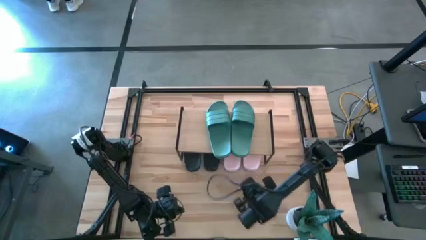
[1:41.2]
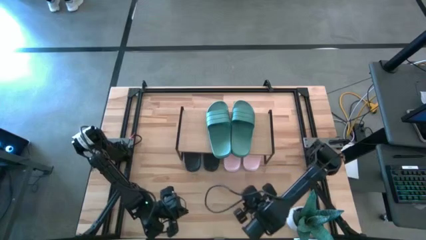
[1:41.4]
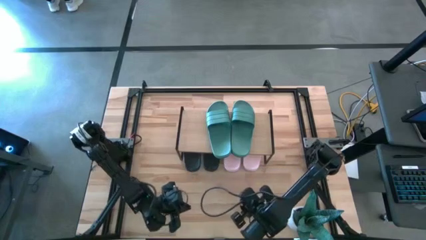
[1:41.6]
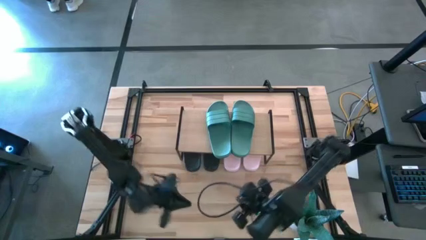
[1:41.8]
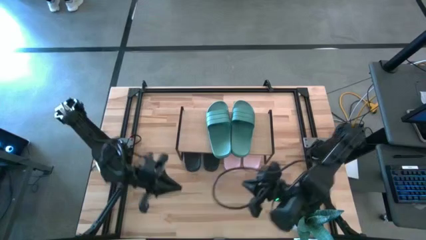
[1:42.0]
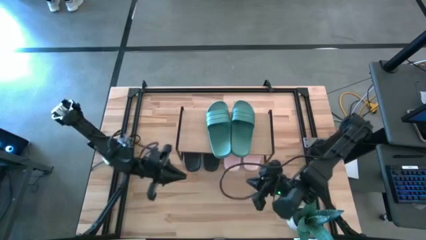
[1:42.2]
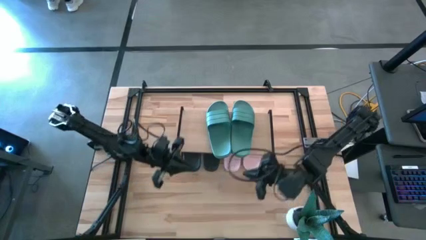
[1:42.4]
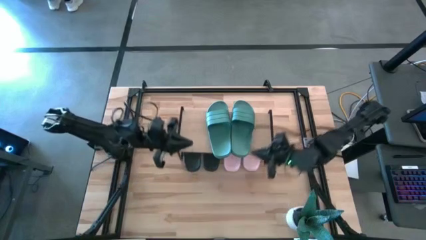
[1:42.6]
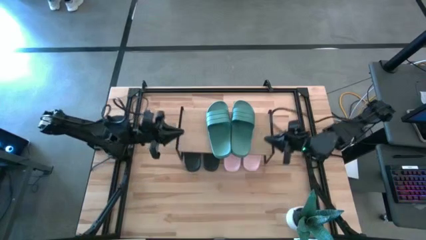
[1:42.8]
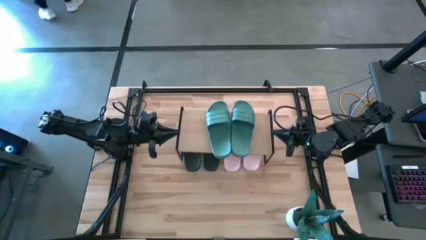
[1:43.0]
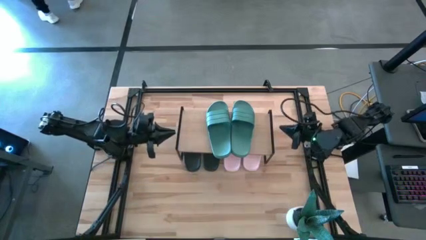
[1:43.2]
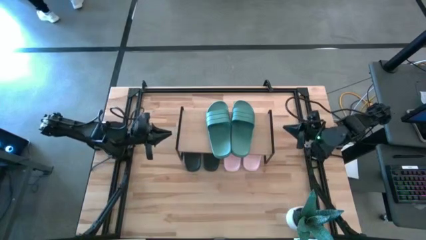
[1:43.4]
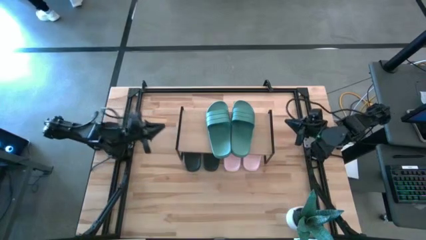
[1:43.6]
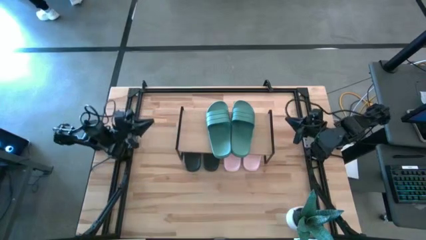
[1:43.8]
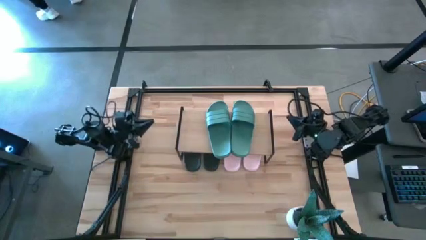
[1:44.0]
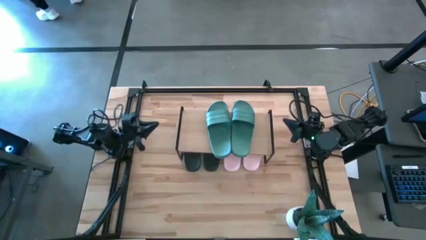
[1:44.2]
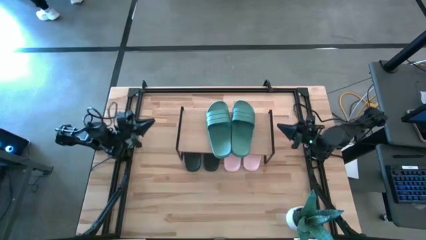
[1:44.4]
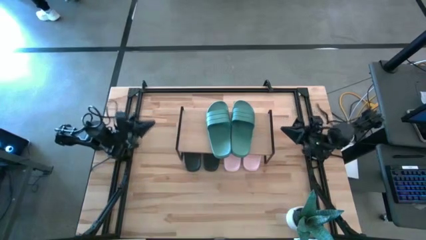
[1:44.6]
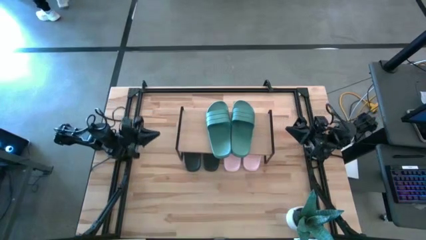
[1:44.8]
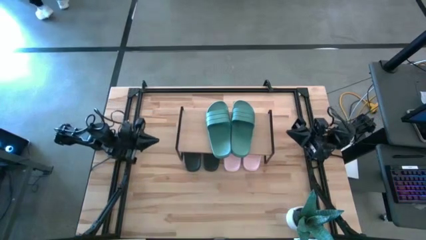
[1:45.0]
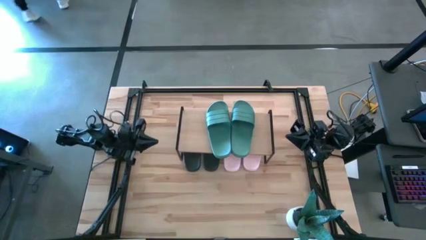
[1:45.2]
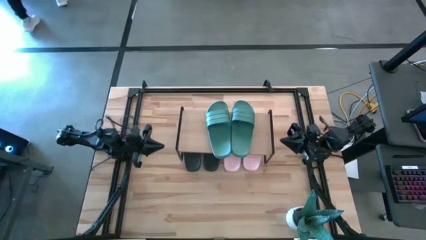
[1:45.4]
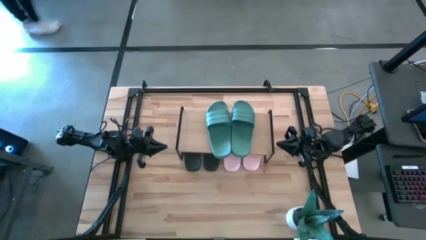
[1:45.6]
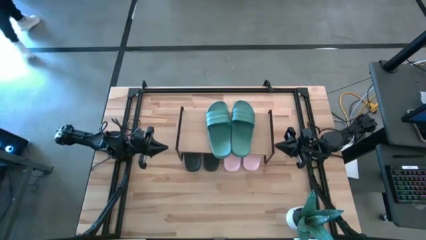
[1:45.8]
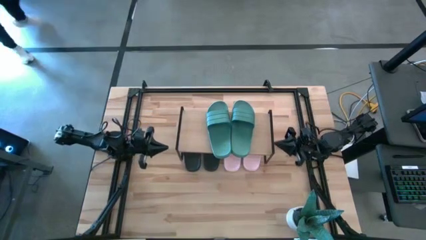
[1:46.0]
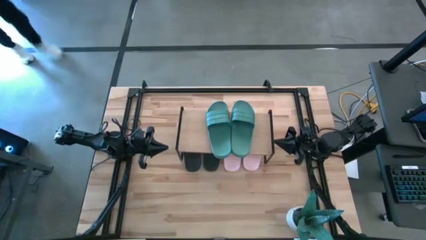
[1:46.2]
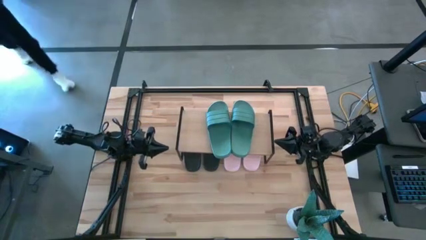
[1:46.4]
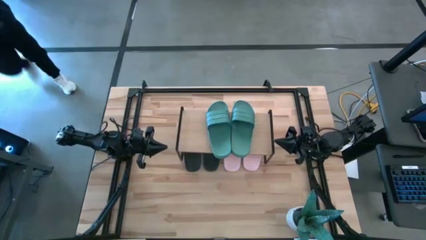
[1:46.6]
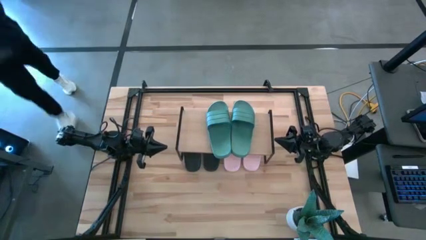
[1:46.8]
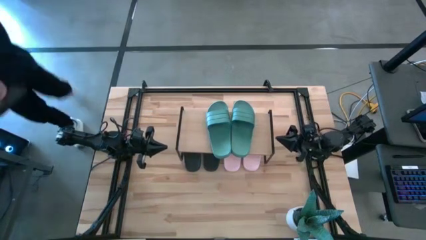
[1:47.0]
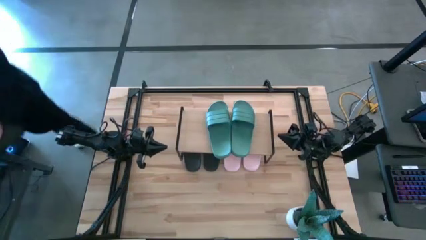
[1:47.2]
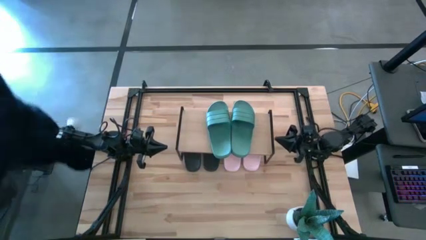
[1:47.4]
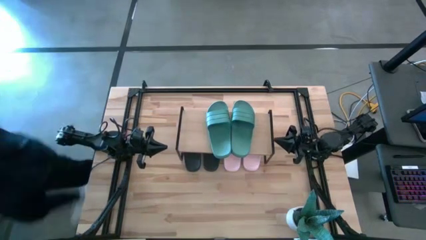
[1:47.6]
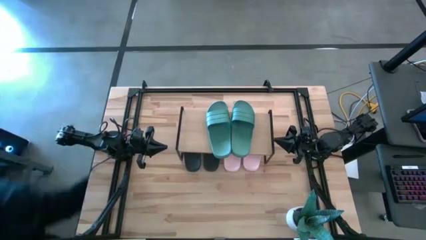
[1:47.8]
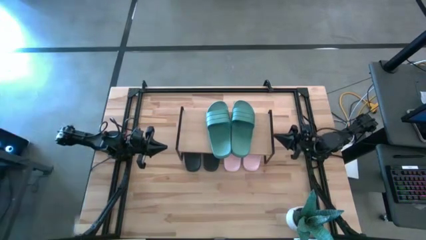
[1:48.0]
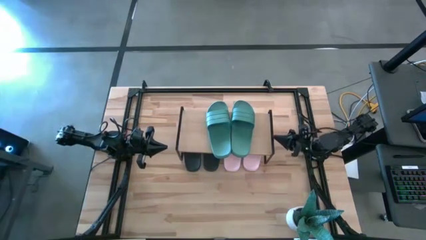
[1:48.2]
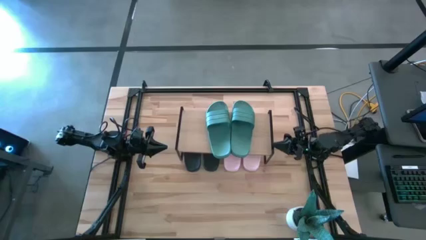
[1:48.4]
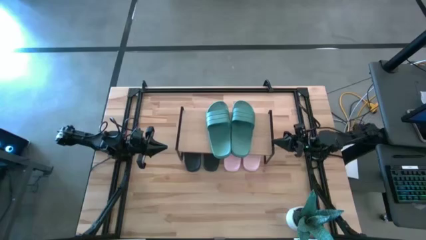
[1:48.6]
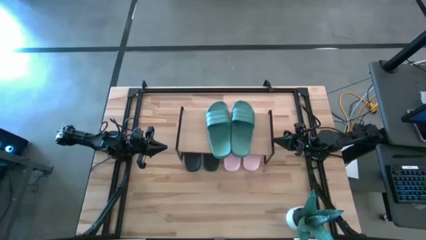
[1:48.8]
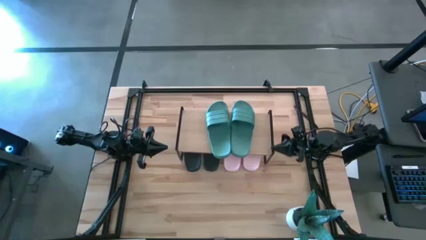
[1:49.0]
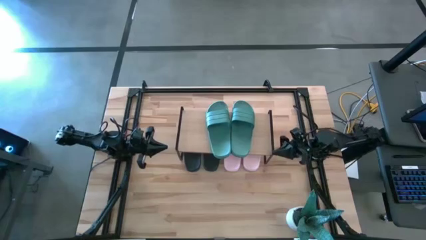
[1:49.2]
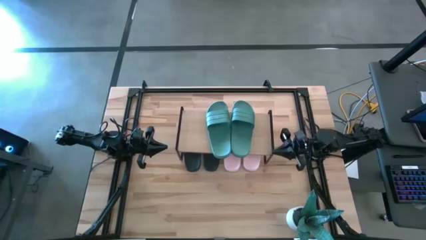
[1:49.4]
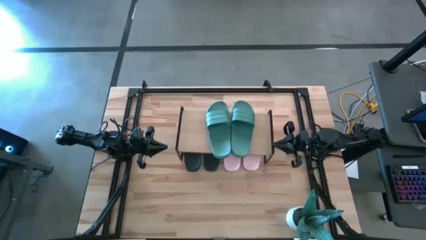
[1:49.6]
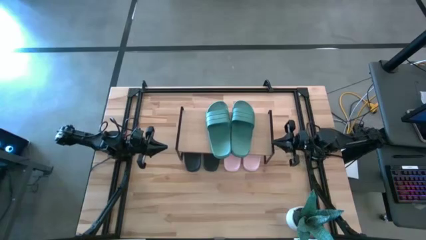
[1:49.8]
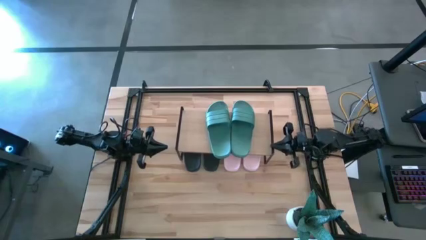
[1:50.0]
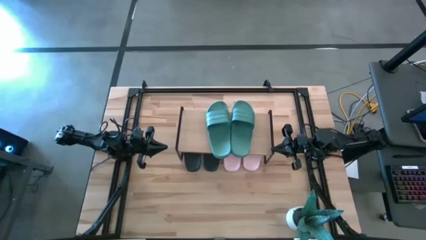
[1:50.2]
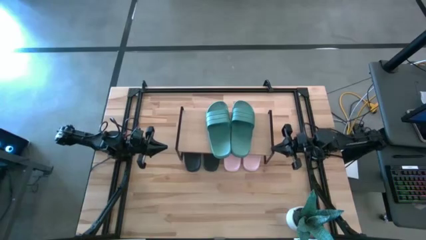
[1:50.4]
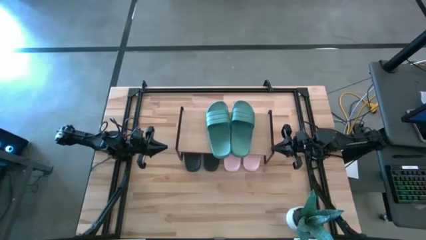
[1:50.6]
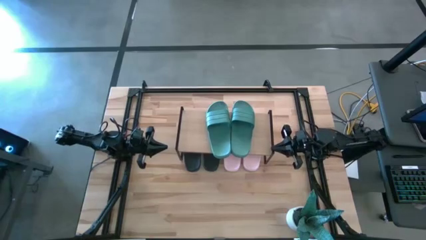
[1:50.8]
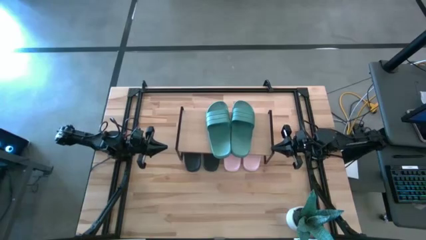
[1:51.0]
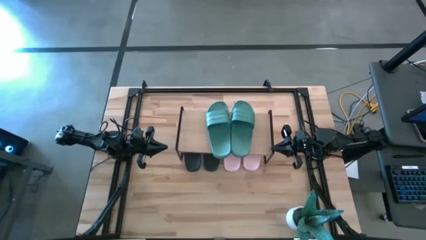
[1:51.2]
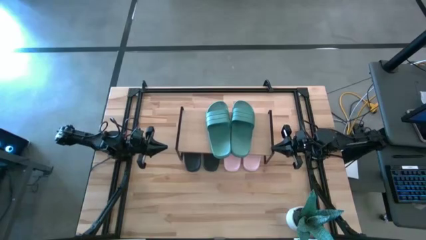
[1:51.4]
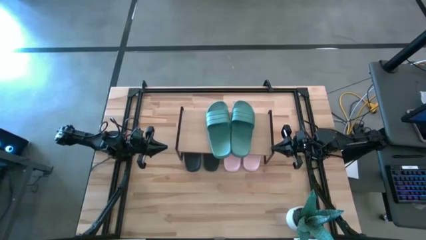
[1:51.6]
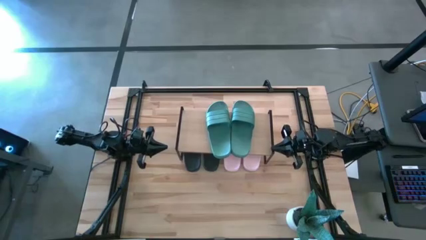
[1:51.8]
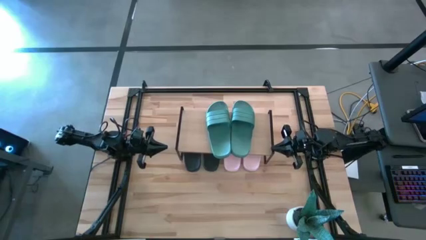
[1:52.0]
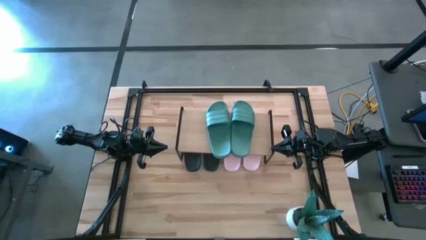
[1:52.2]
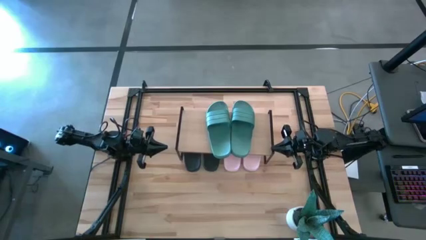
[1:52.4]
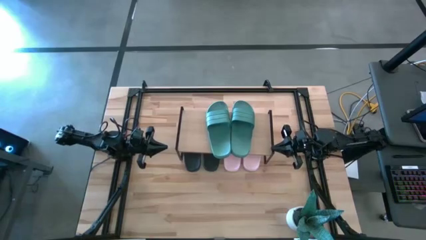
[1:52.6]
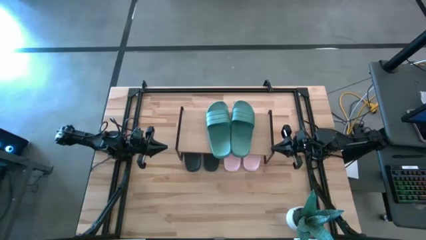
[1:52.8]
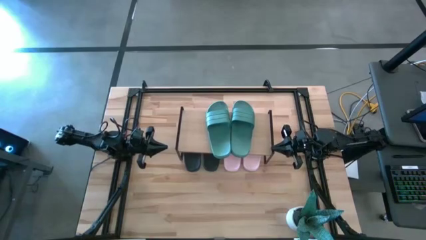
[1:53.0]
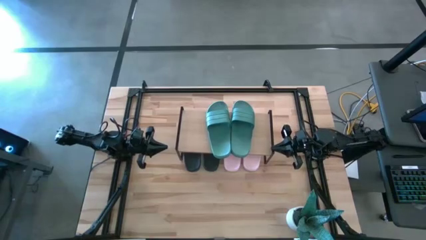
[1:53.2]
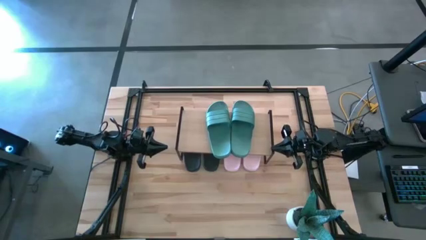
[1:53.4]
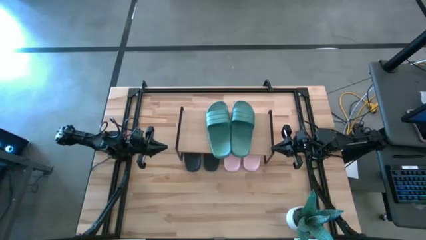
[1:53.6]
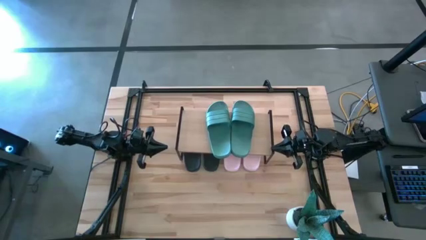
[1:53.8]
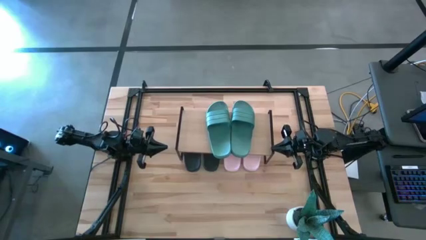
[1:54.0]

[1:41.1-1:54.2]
Task: Pick and place slides into the shelf
Return to Home Position

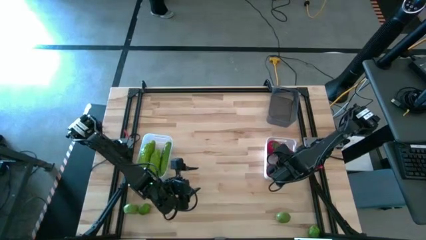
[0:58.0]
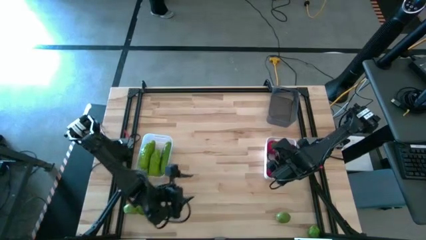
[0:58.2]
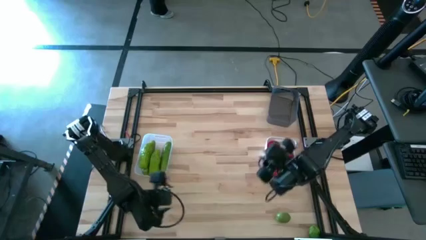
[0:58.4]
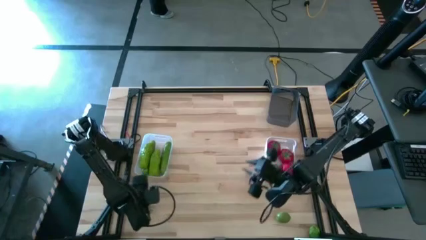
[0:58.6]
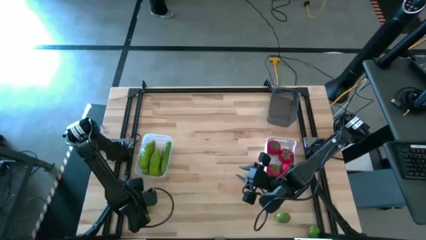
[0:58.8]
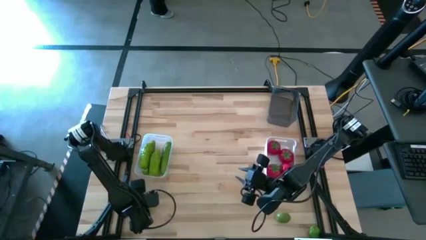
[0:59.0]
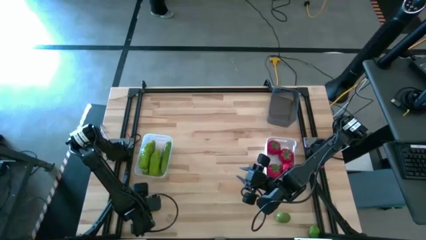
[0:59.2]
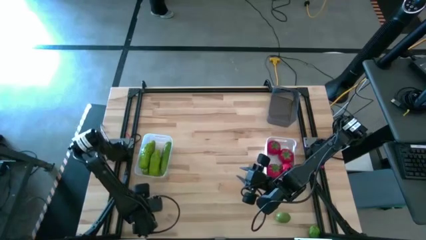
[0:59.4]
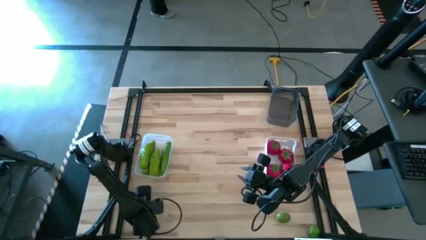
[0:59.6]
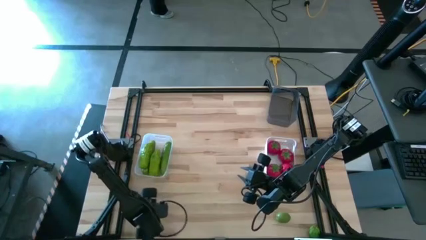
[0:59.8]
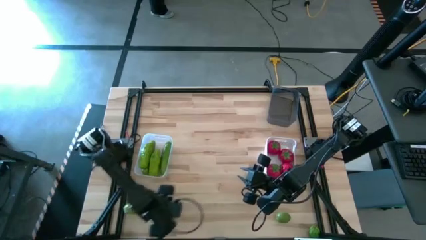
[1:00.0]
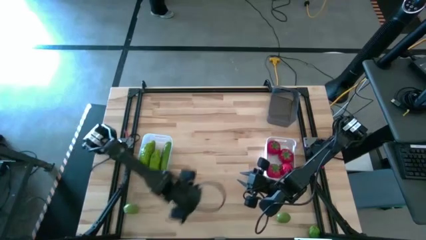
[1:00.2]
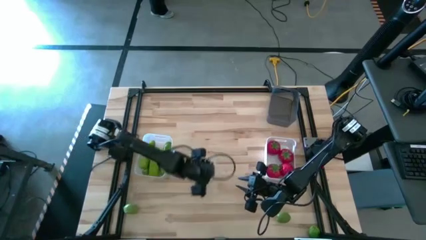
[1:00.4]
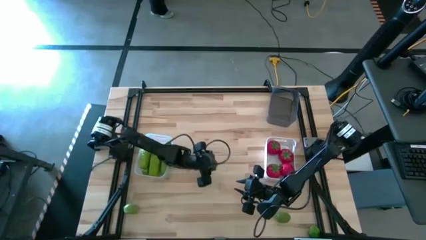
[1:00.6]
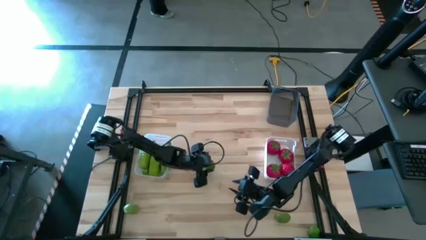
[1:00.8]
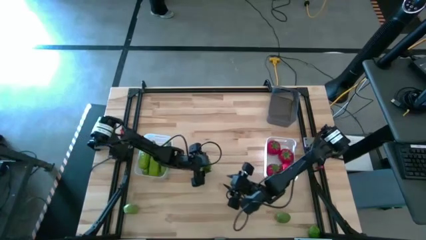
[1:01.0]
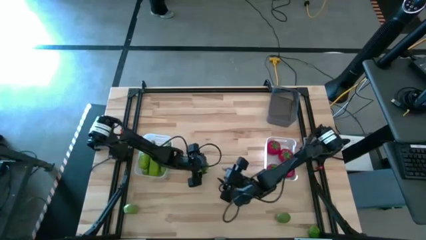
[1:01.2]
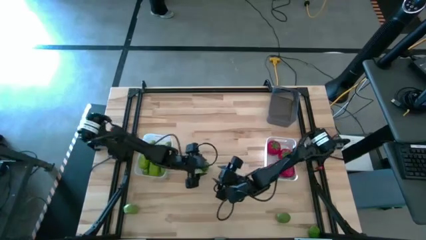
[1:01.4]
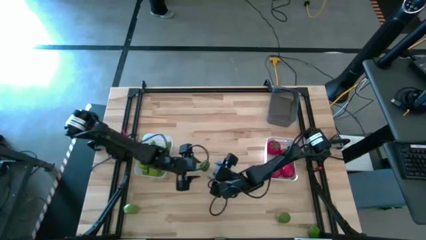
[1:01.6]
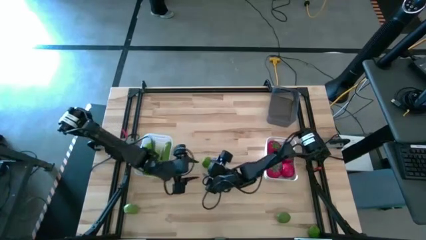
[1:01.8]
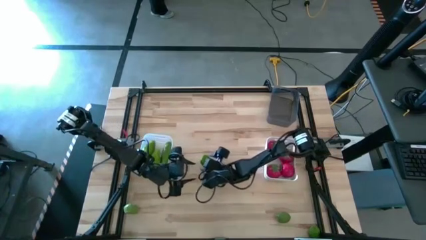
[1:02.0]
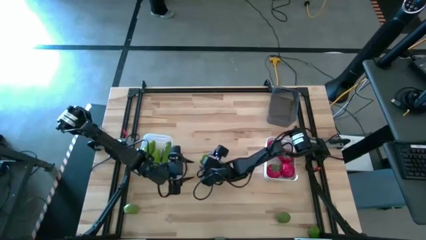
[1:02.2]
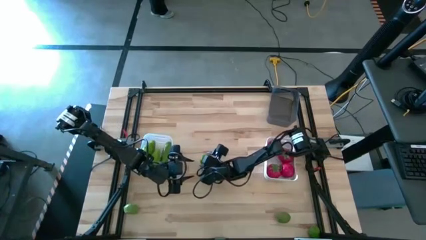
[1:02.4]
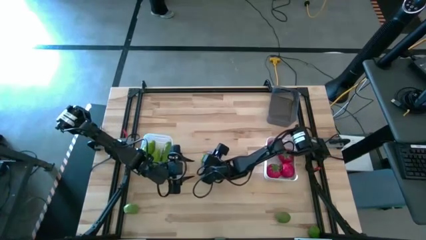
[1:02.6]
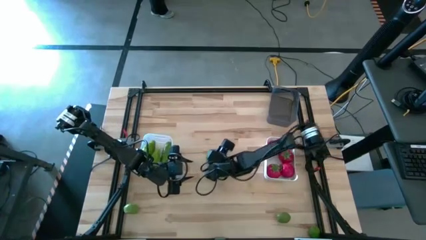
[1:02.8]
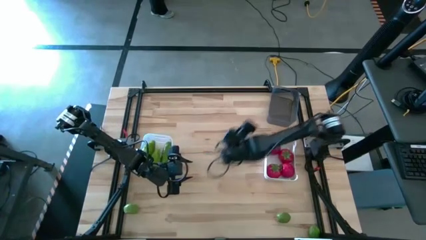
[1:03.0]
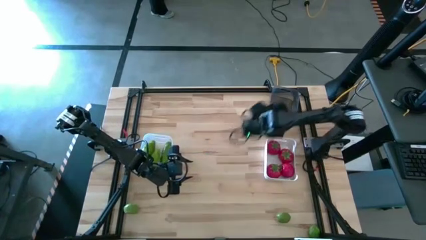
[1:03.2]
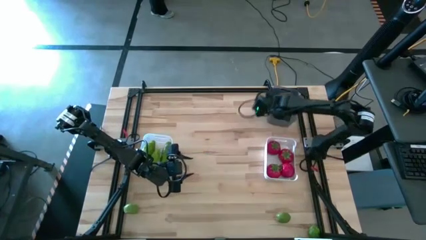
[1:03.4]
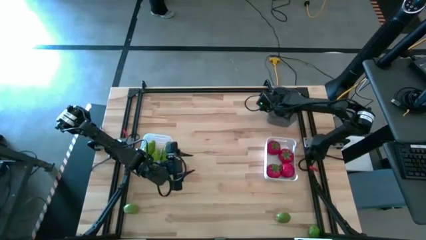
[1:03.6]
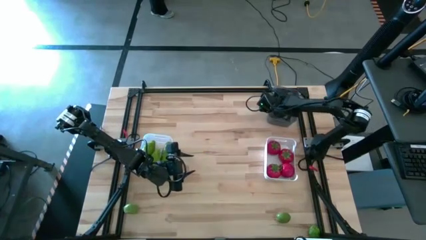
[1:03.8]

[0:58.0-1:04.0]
Task: Sort produce into baskets
Put the lime into the black bin
